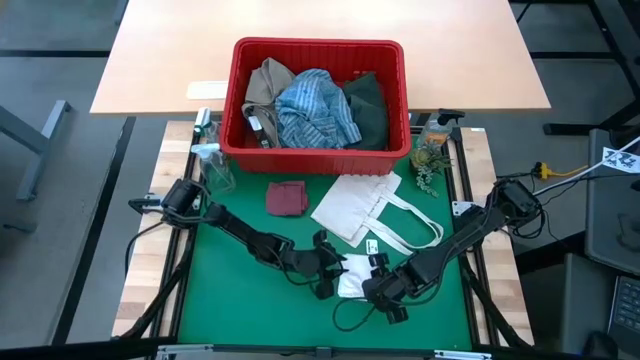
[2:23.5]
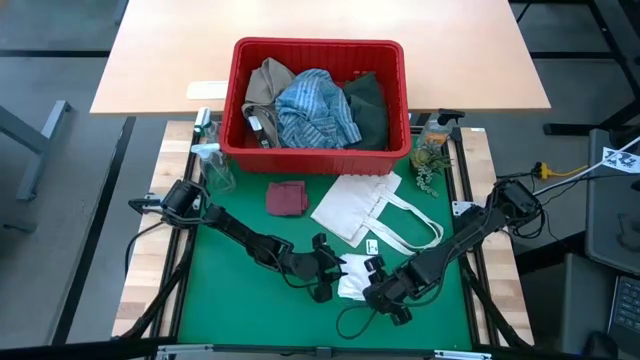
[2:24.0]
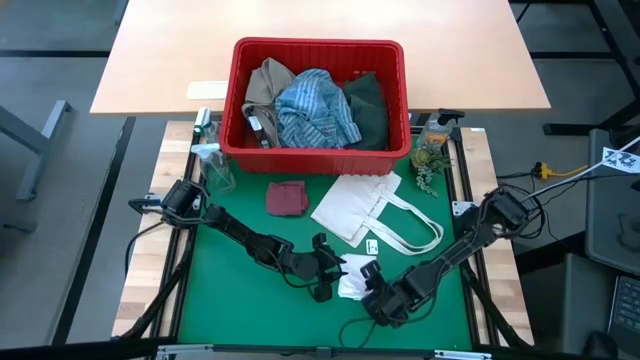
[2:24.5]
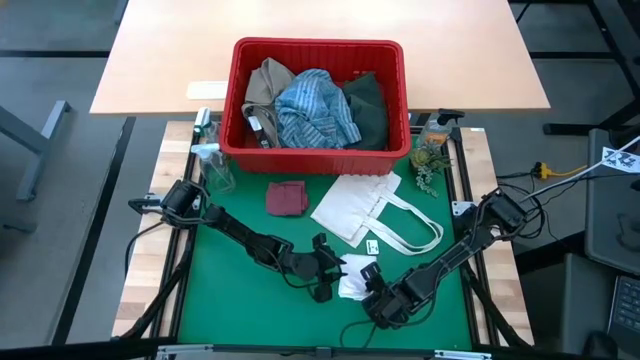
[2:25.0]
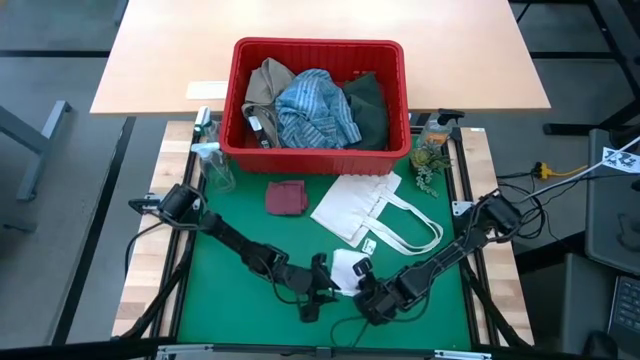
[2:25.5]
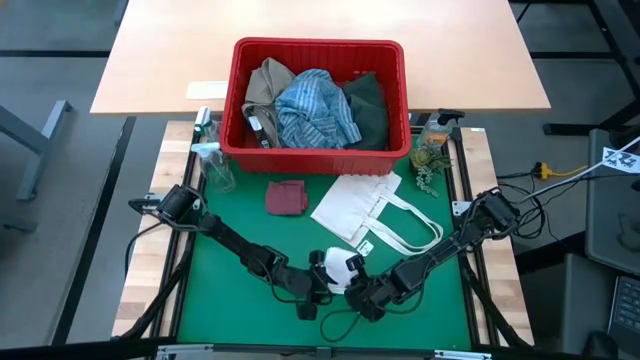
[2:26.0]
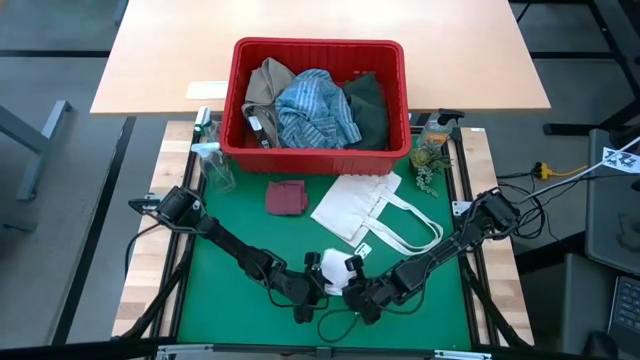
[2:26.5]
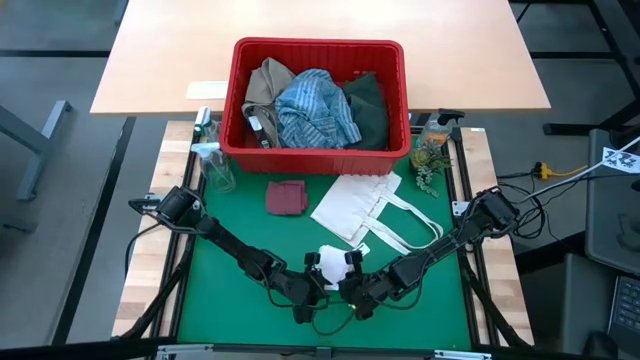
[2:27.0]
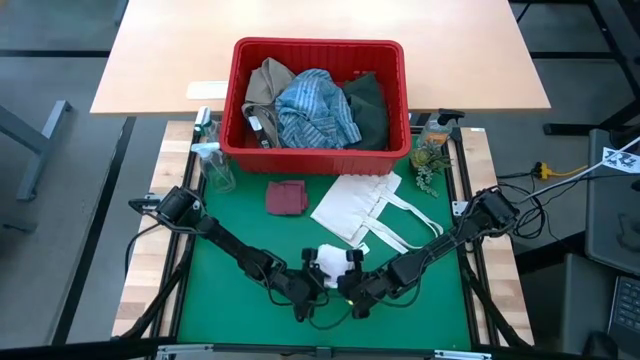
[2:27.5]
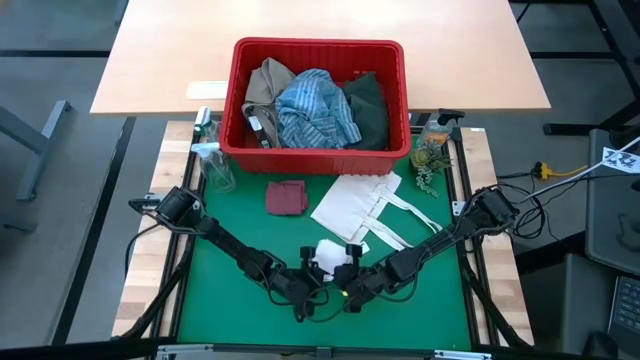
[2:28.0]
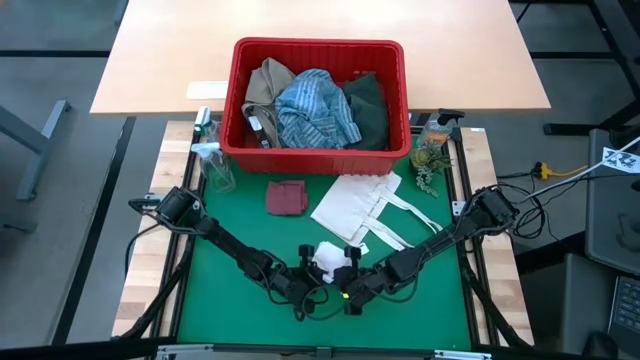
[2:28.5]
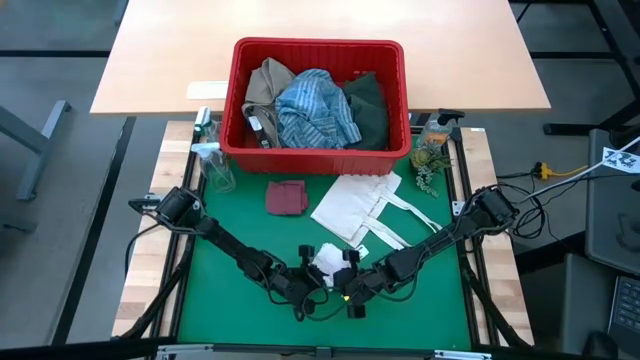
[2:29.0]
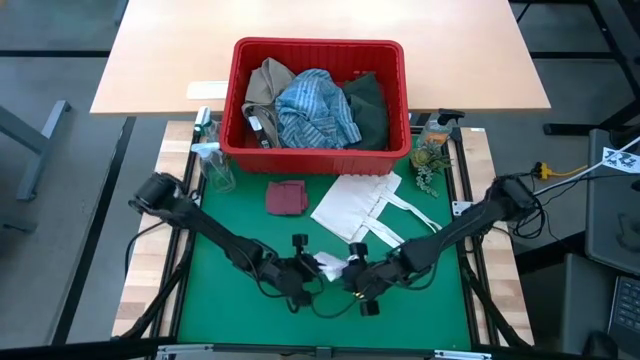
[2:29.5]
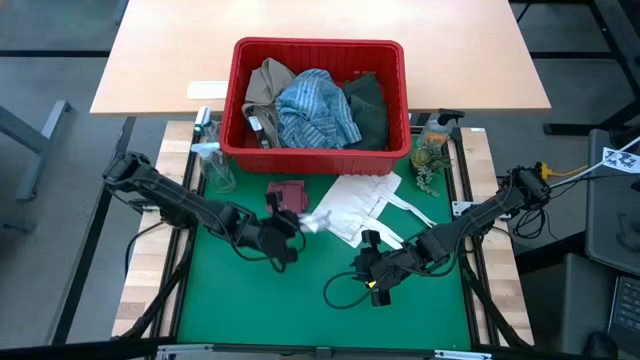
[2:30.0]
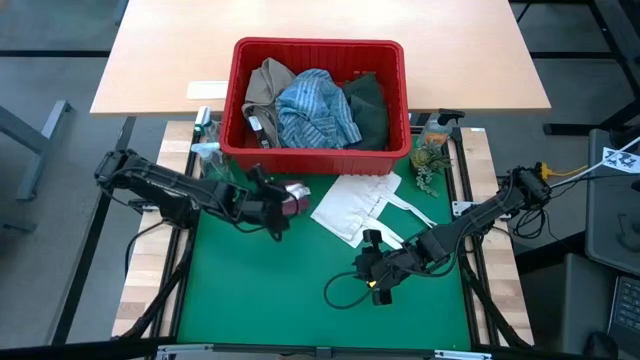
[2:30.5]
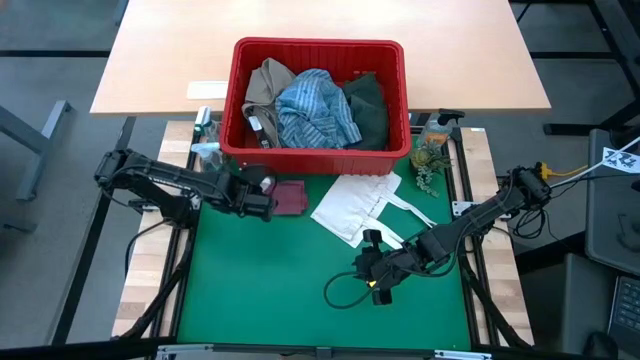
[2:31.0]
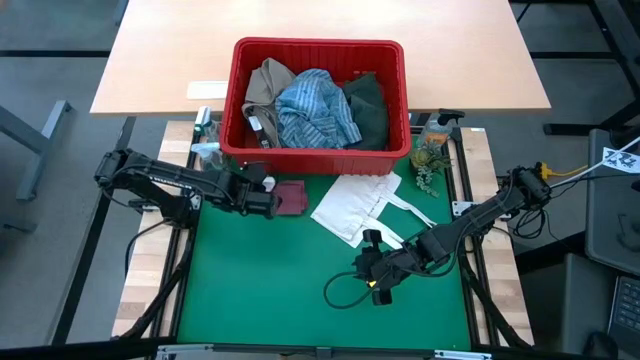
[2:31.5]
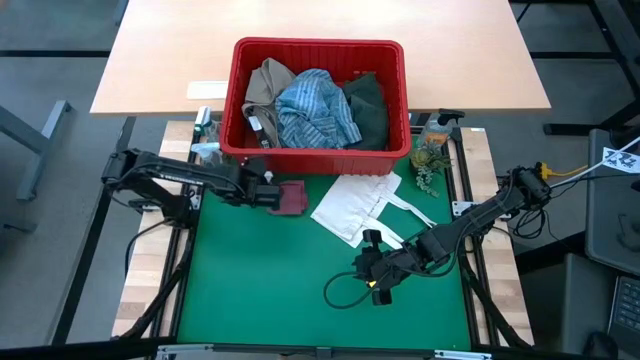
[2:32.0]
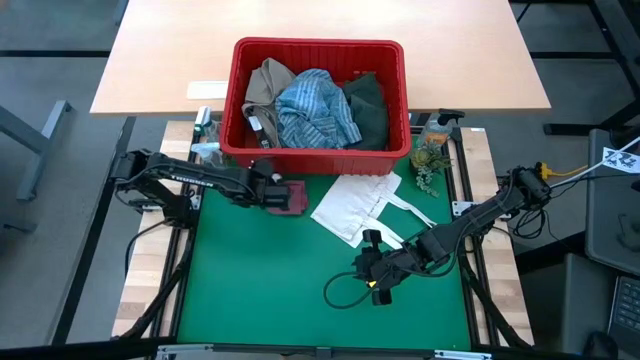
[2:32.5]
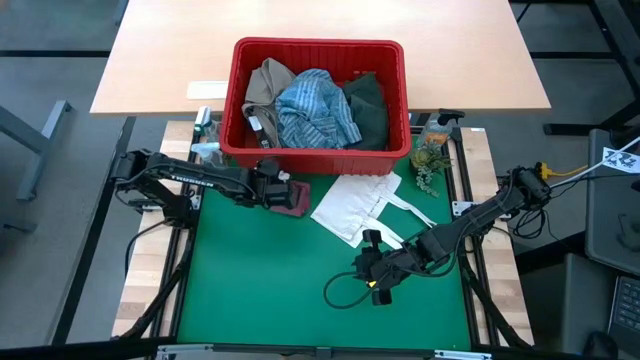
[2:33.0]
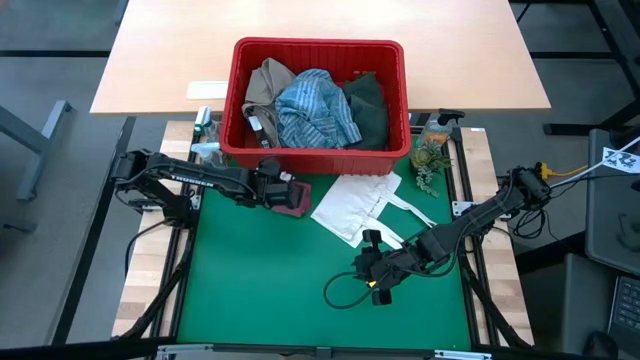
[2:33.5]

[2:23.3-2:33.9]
Task: Fold Laundry from Bin
Stack the folded white underwear on top of the pink underwear

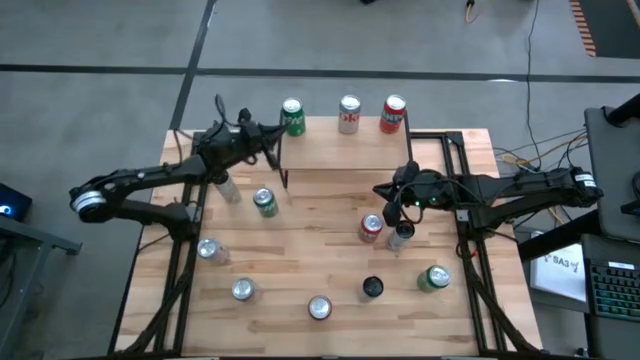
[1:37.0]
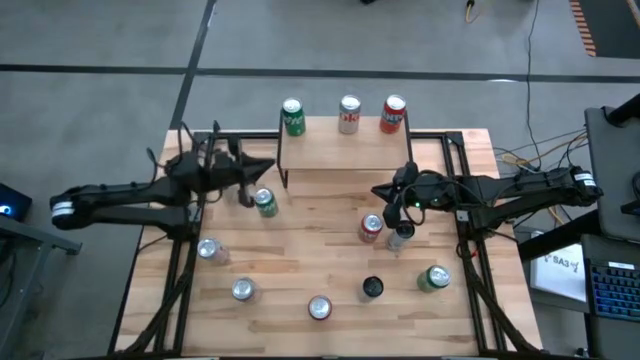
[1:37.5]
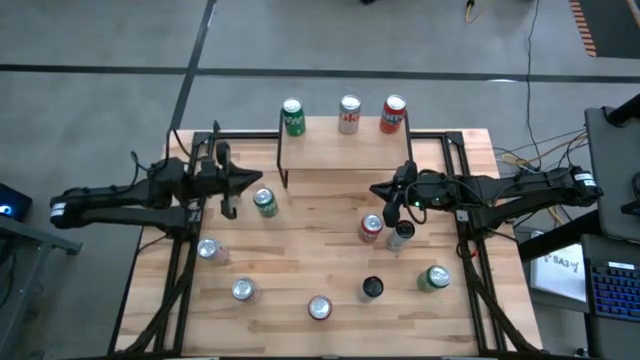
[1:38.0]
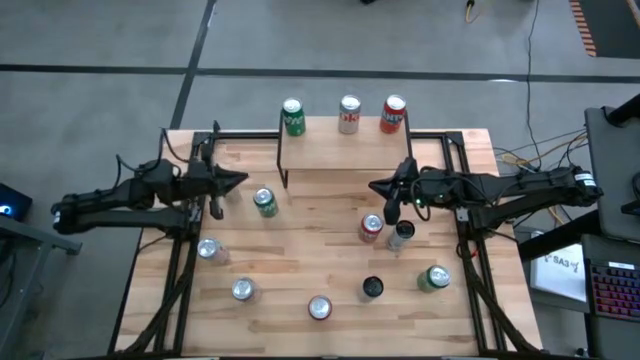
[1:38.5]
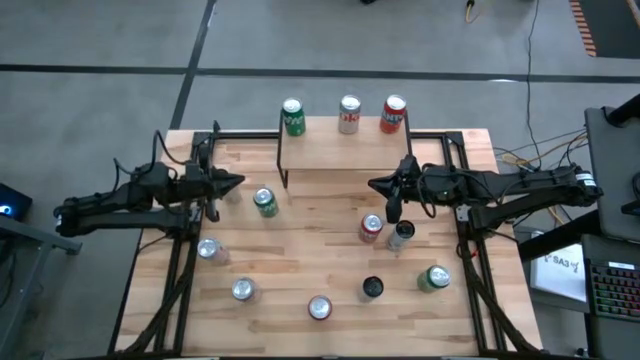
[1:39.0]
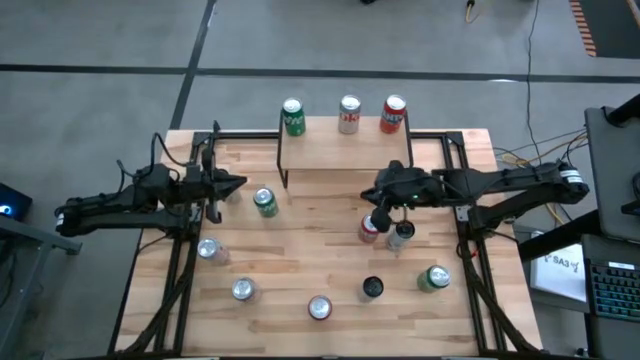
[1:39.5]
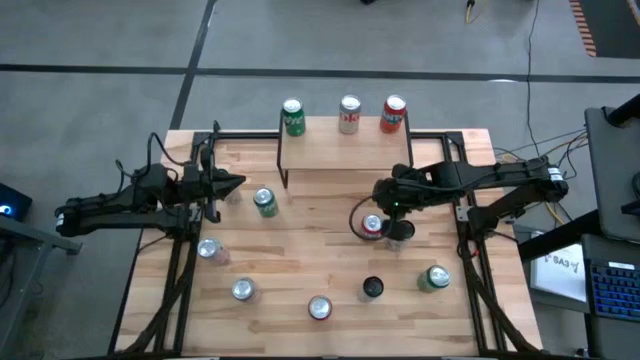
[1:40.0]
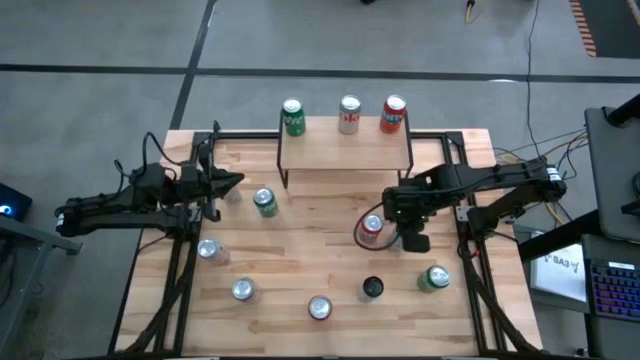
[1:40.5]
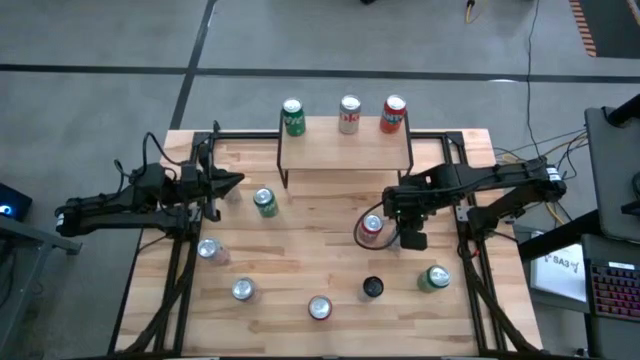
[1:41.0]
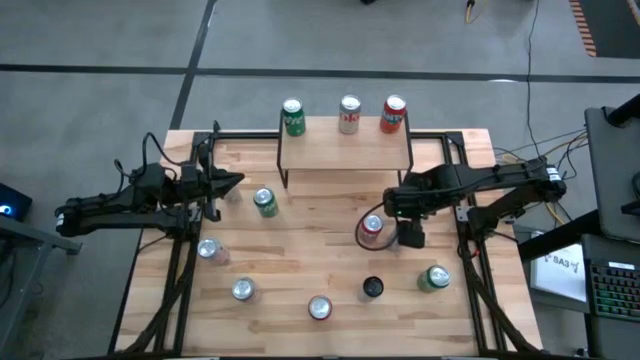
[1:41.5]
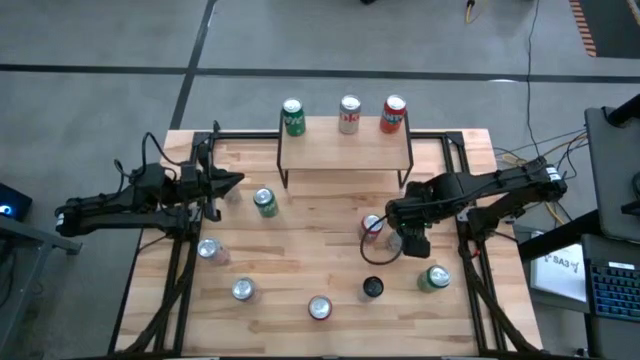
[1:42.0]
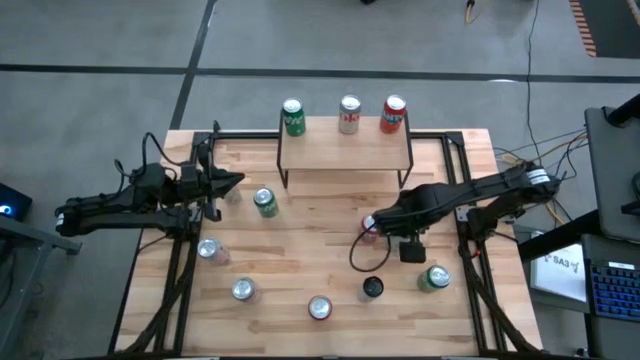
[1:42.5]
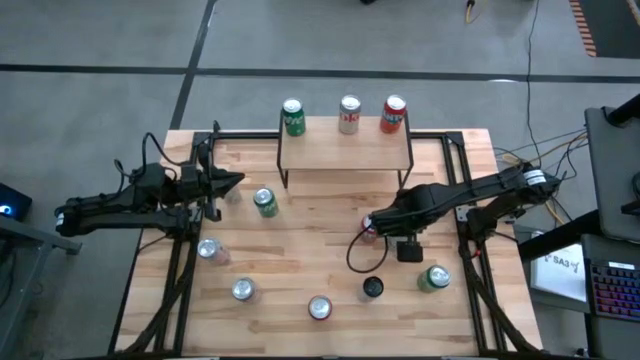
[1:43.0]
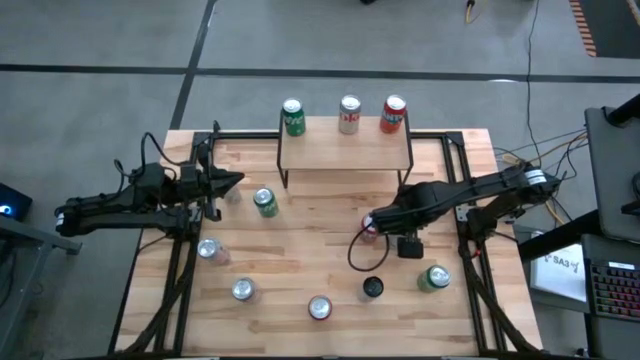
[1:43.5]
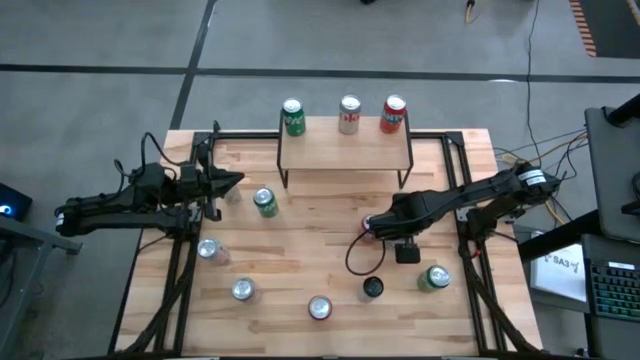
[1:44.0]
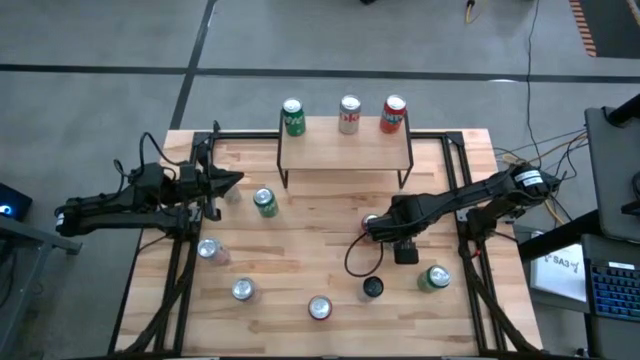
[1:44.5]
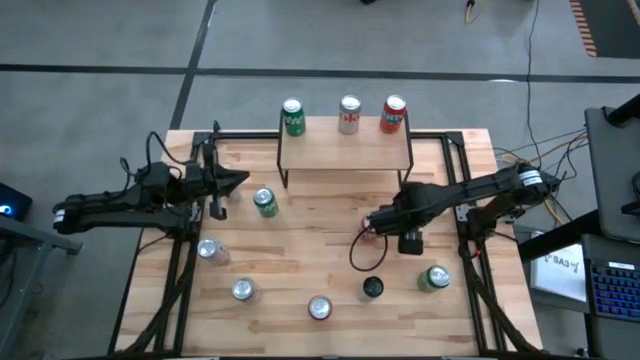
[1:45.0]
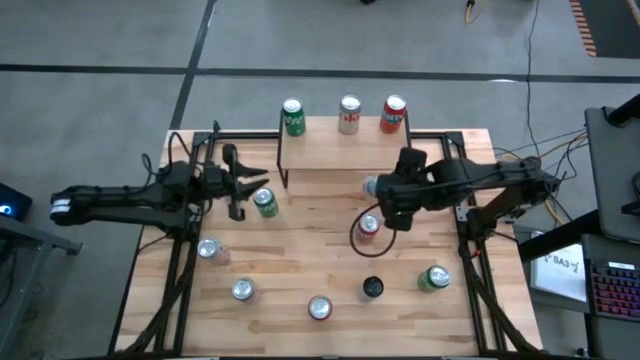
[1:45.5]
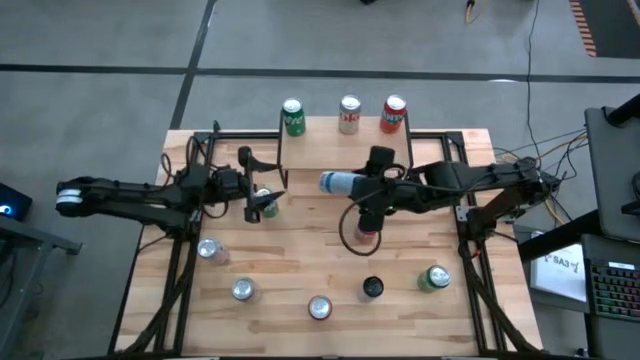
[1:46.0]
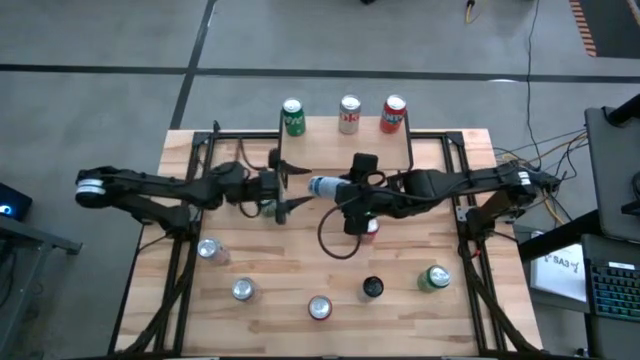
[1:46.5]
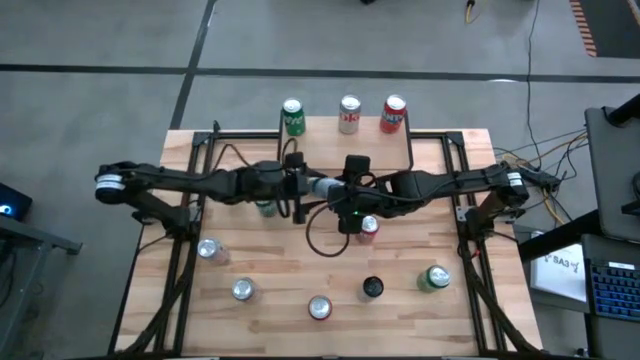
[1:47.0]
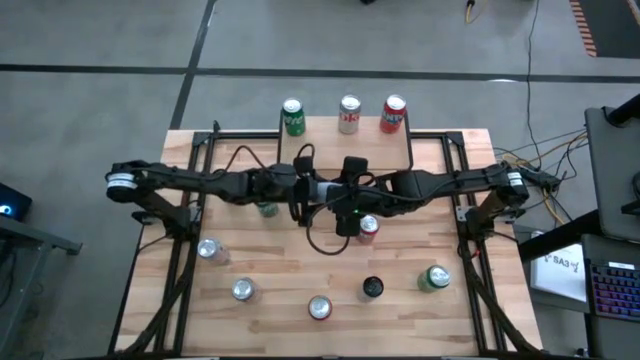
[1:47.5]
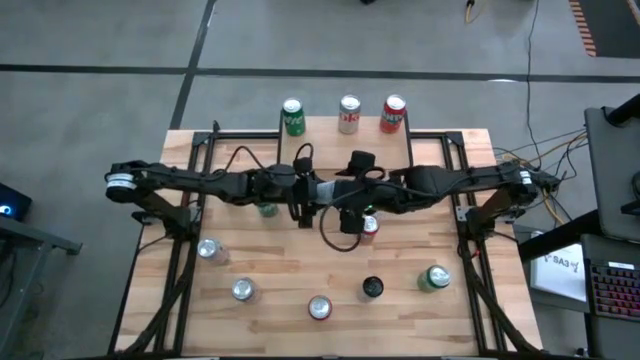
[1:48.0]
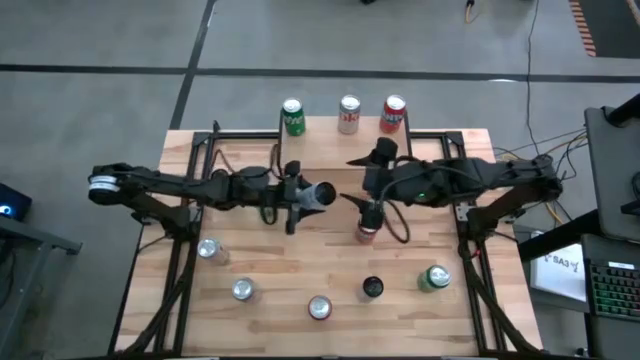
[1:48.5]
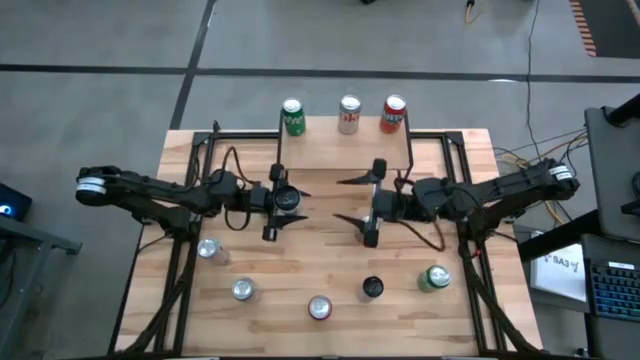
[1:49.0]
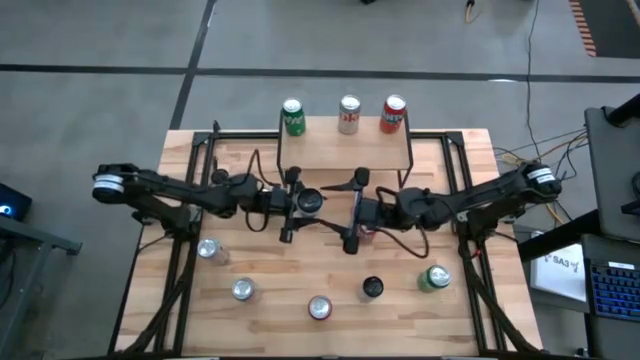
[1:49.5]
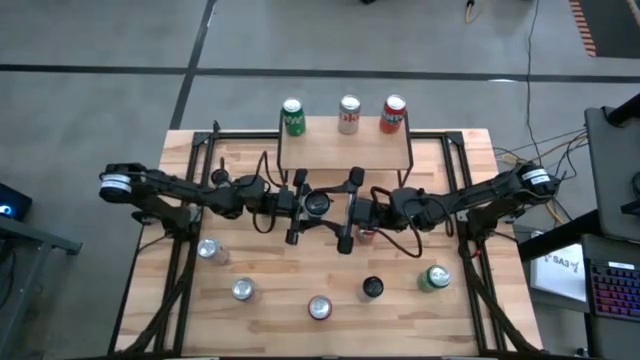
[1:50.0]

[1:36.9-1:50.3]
Task: Place canned beverage on shelf
Put the top white blue soda can on the shelf
